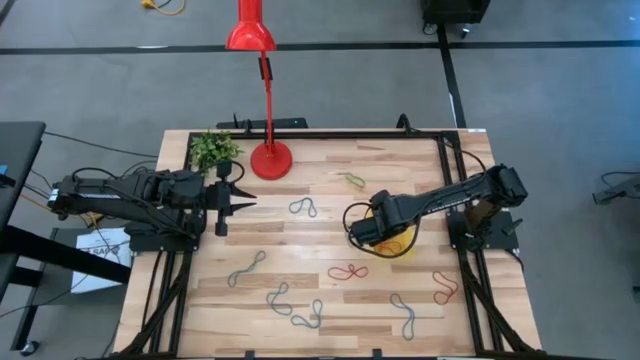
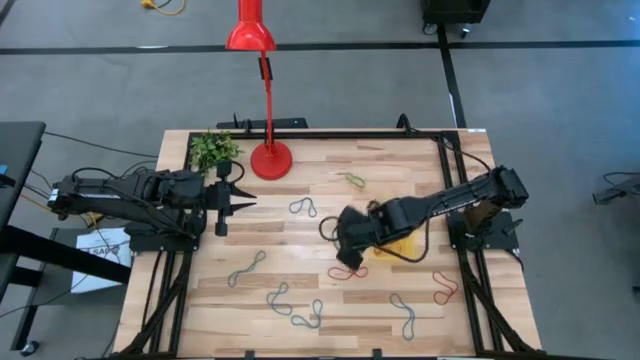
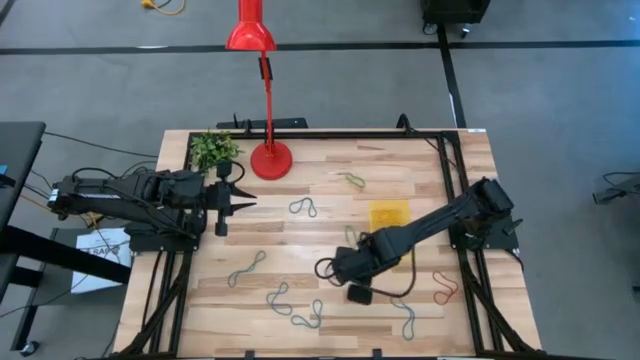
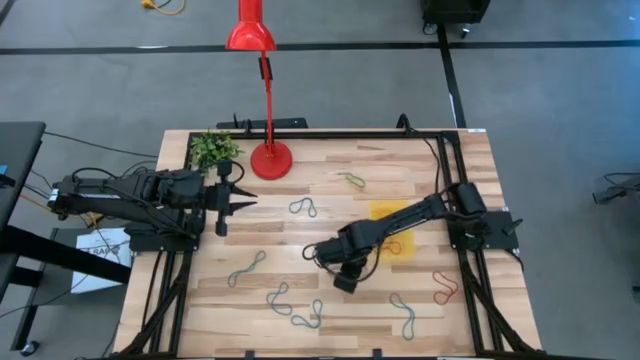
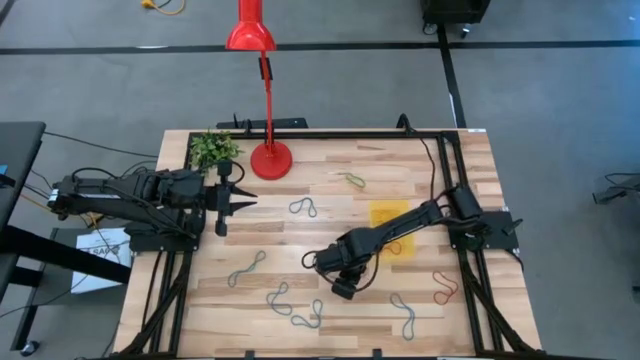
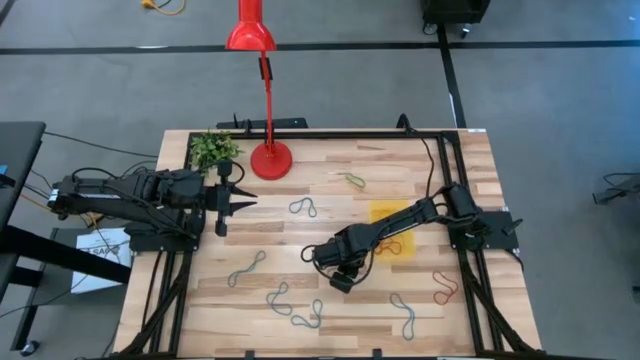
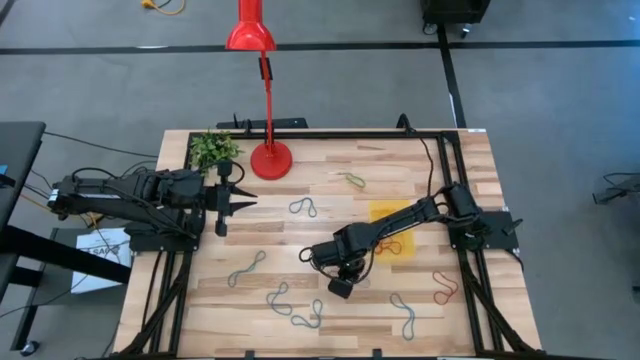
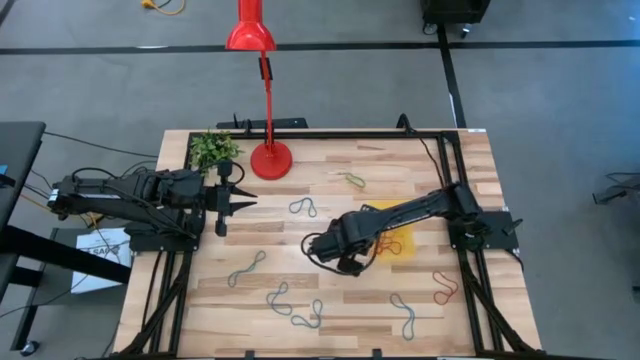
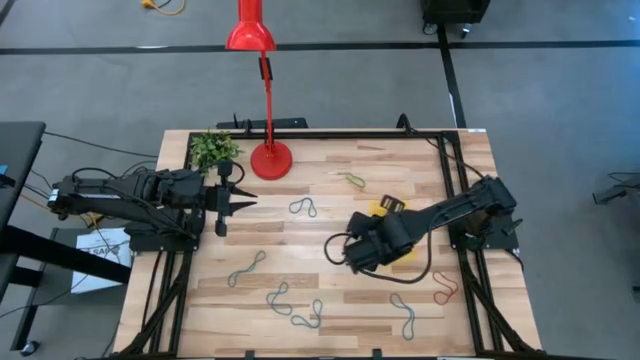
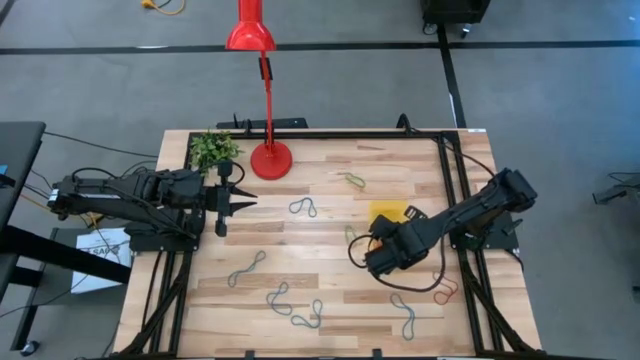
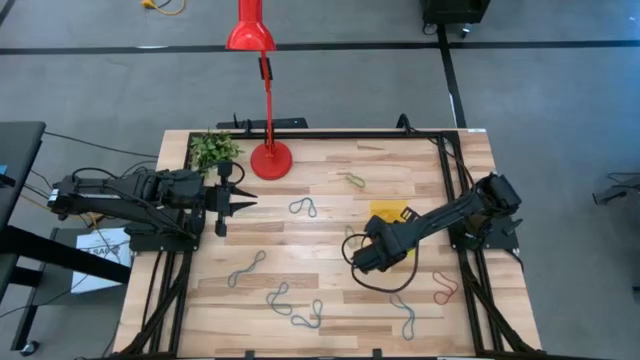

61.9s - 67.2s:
Task: Pick and place items into bin
Put the red rubber band into the yellow bin

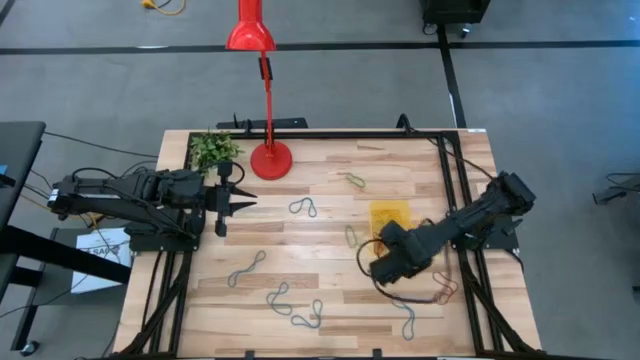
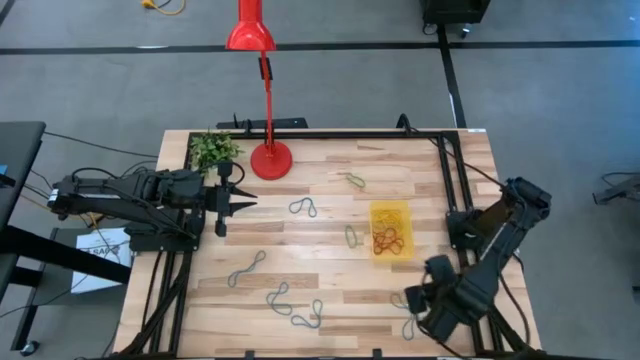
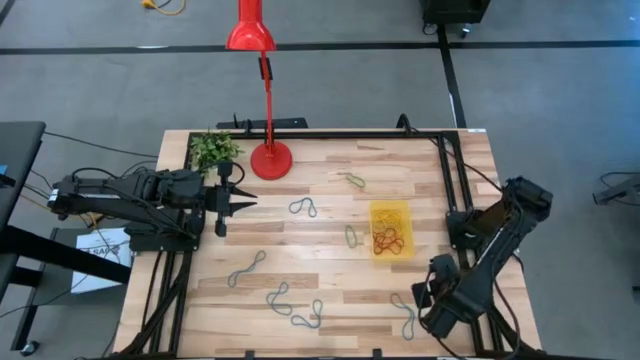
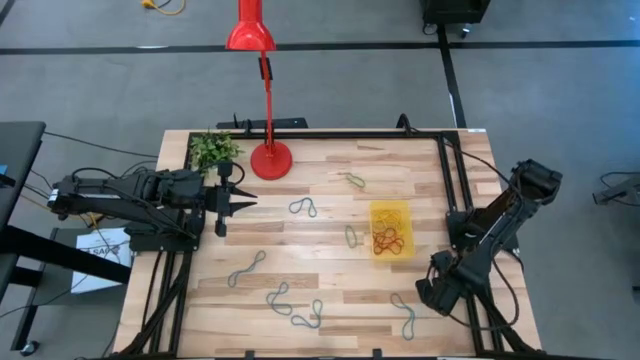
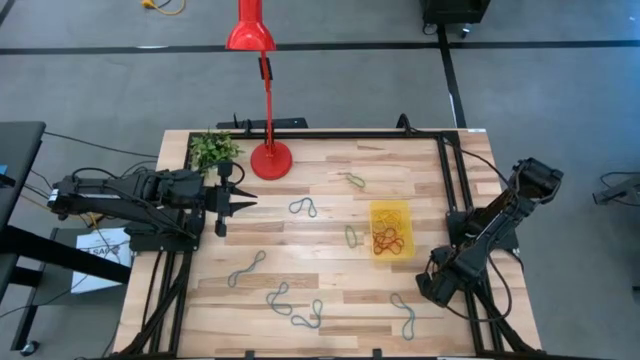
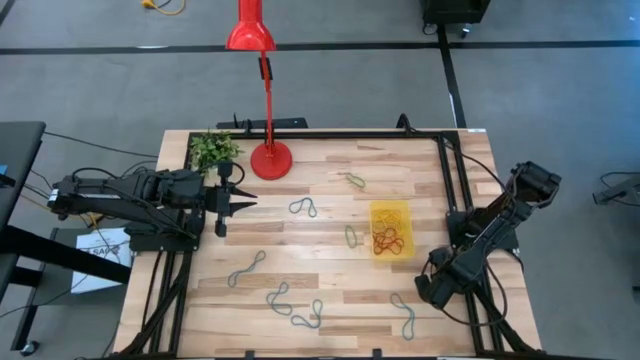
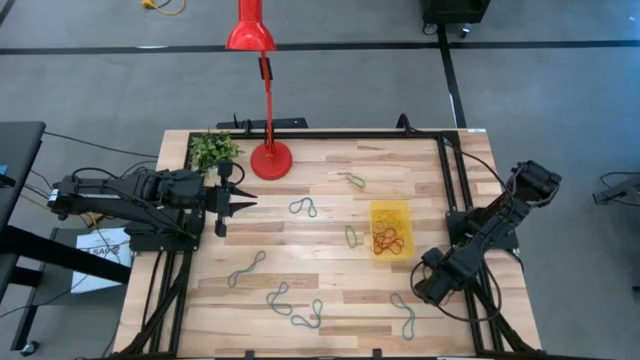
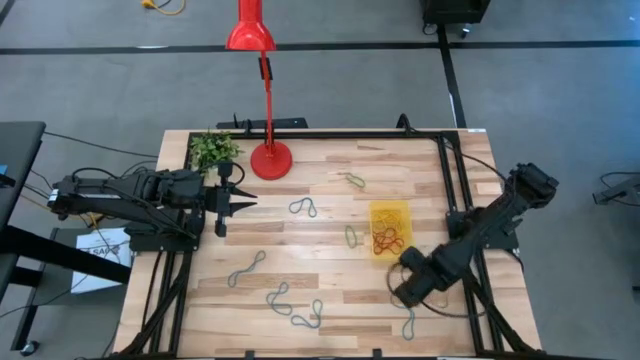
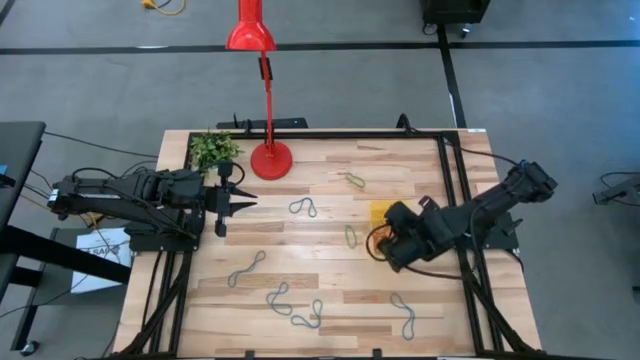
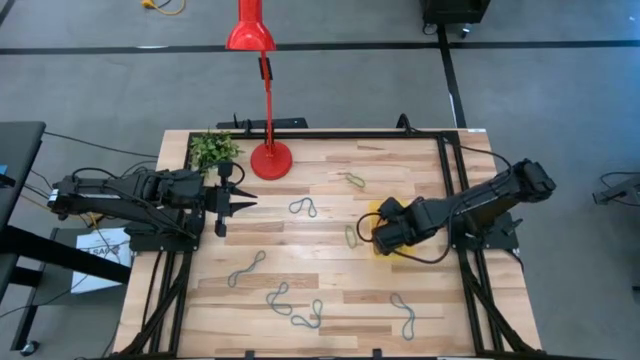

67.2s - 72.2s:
Put the red rubber band into the yellow bin

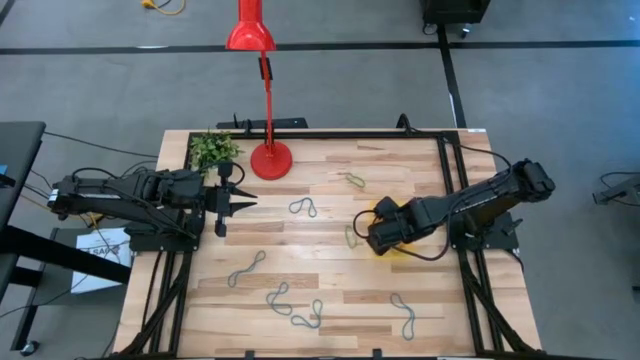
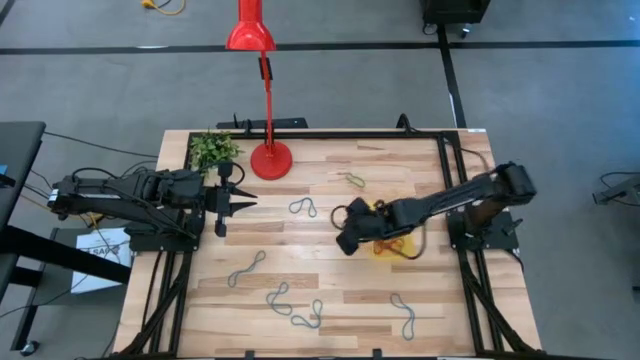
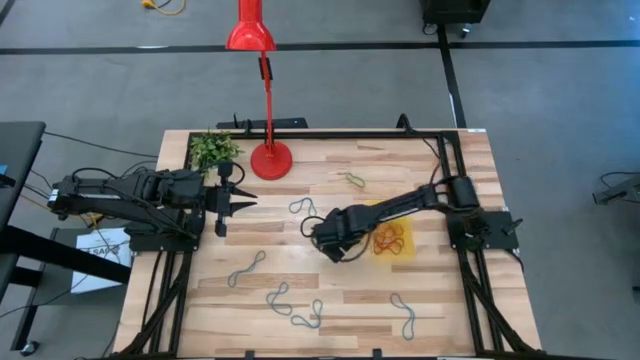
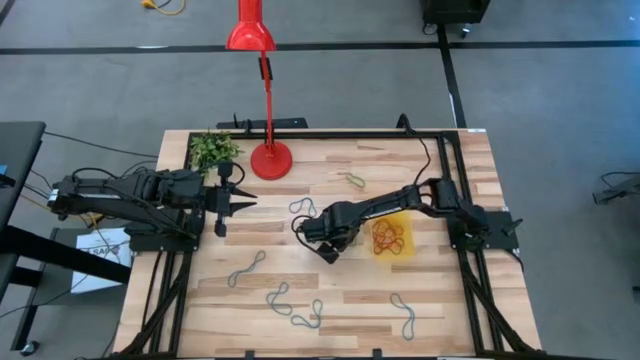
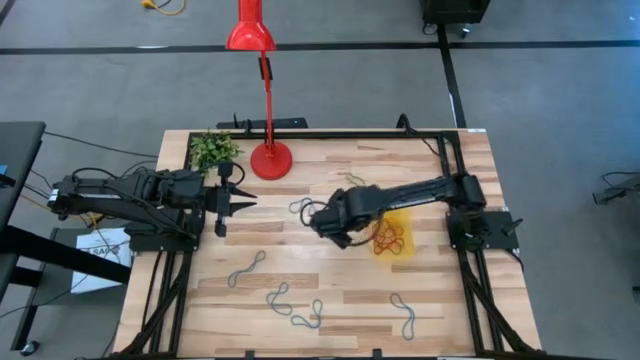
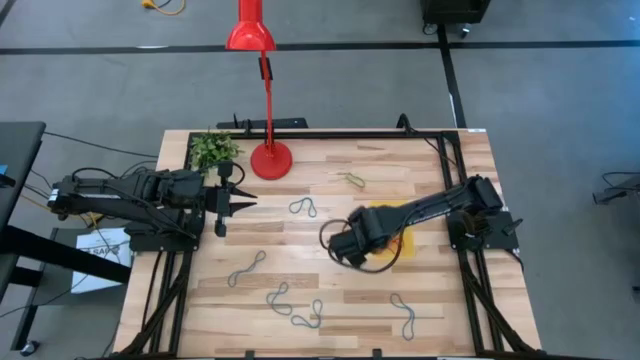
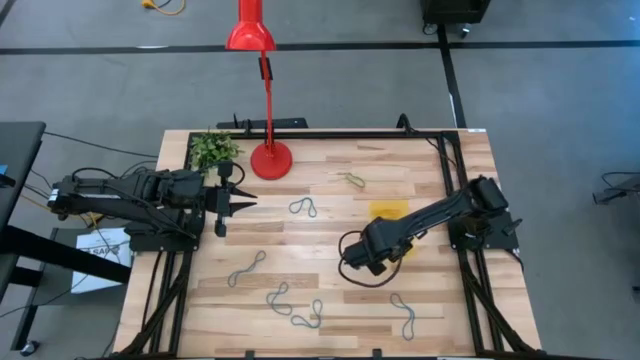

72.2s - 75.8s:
Put the green rubber band into the yellow bin

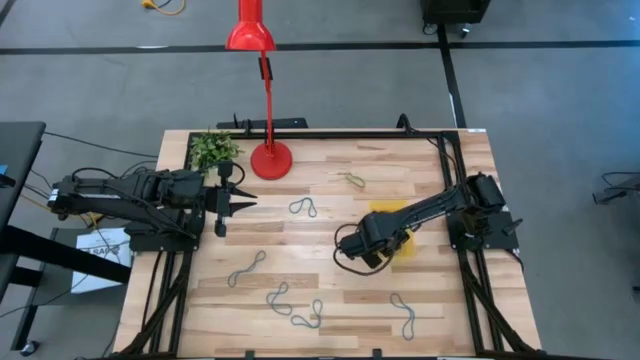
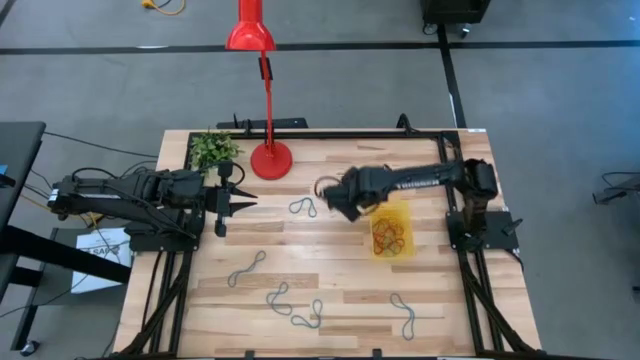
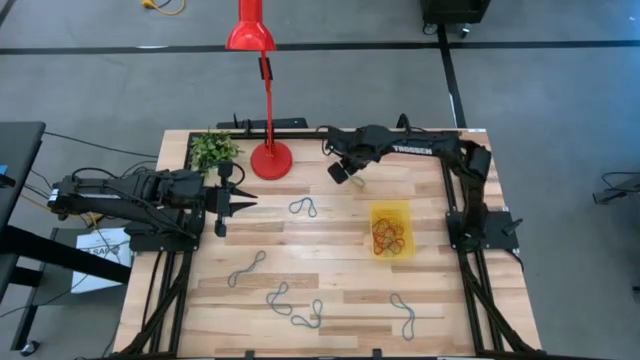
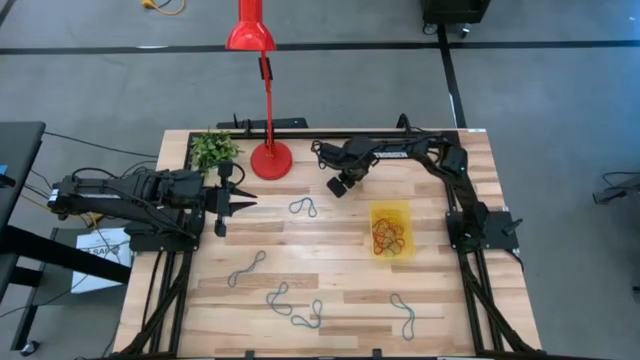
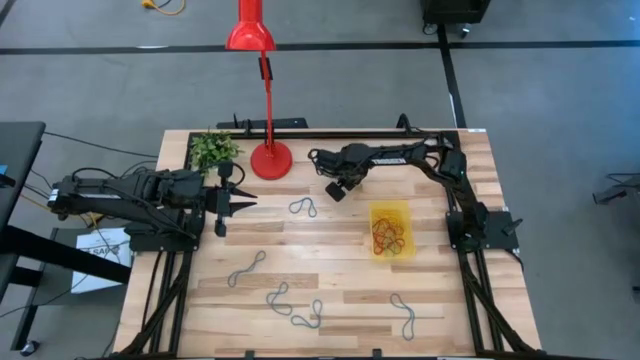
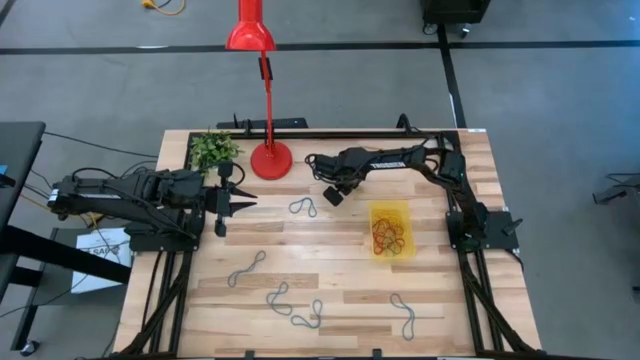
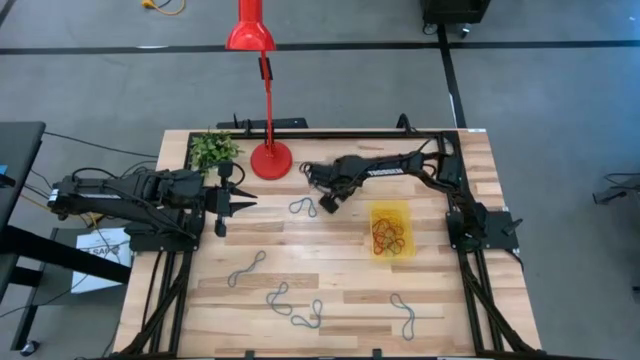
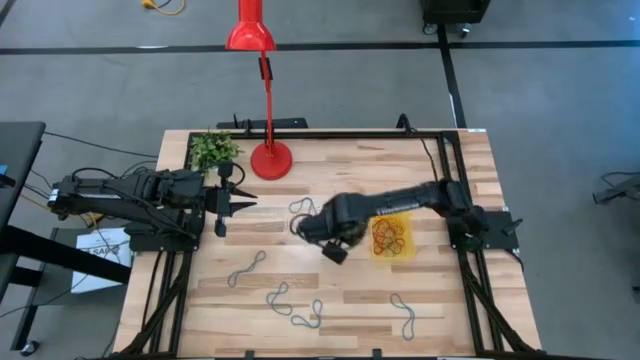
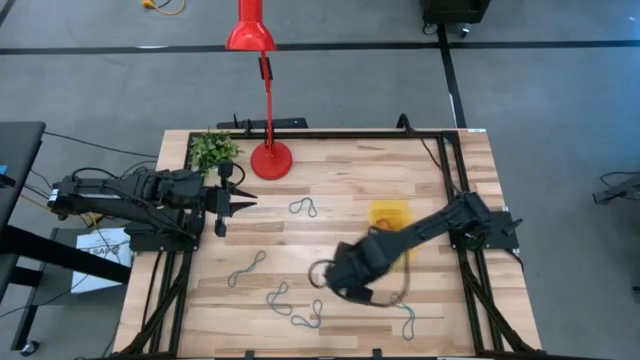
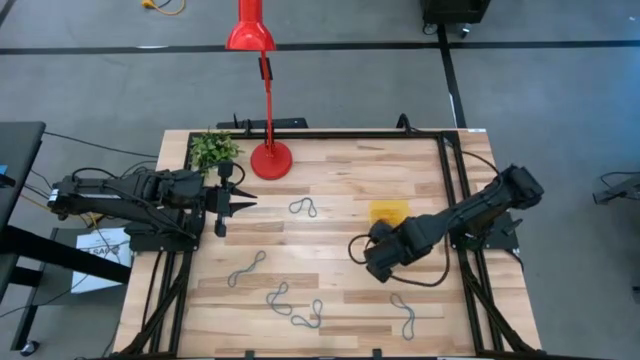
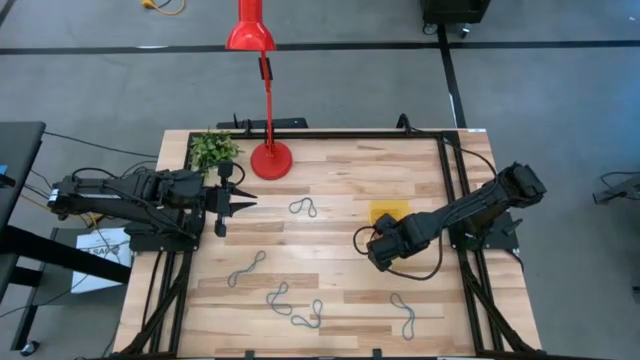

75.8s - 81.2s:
Put the green rubber band into the yellow bin

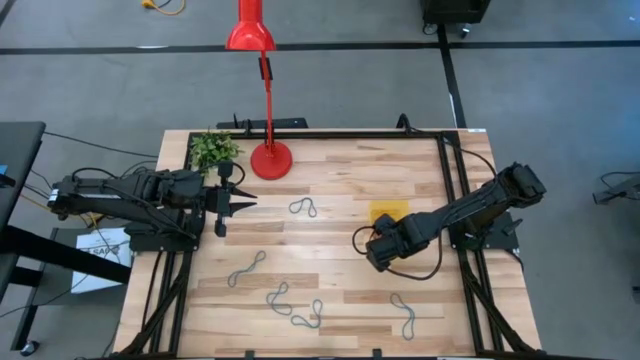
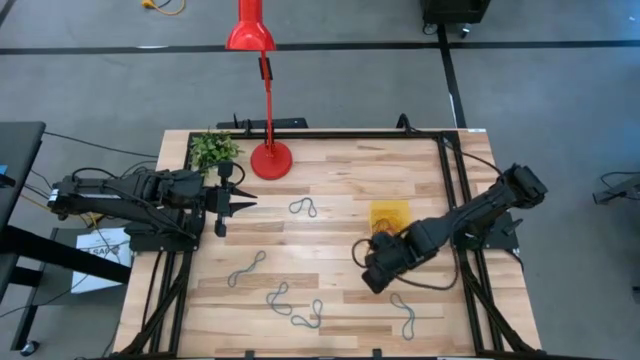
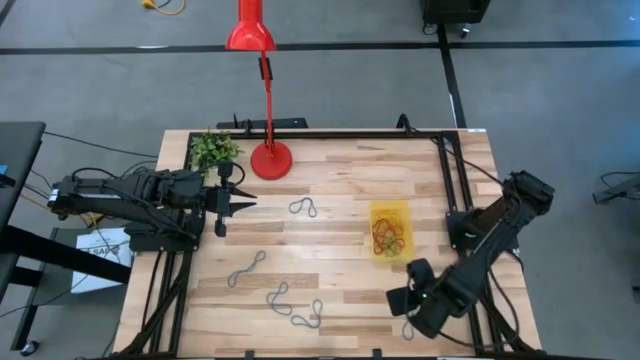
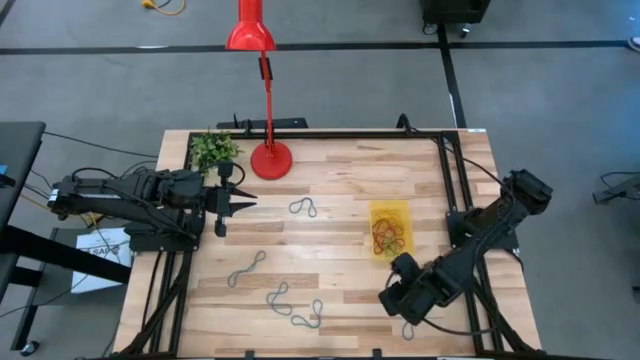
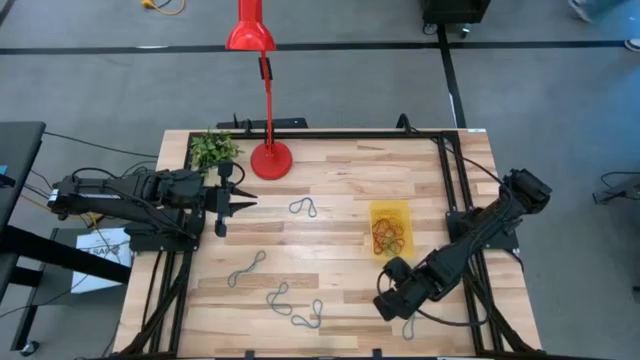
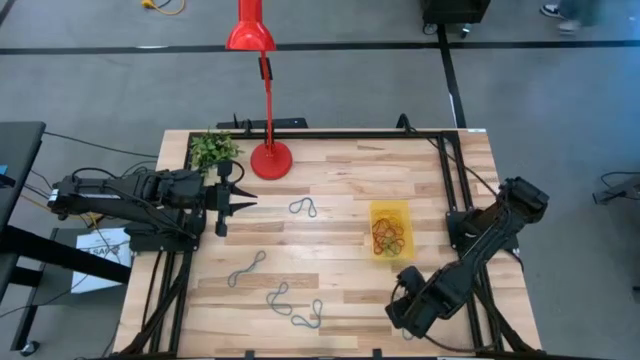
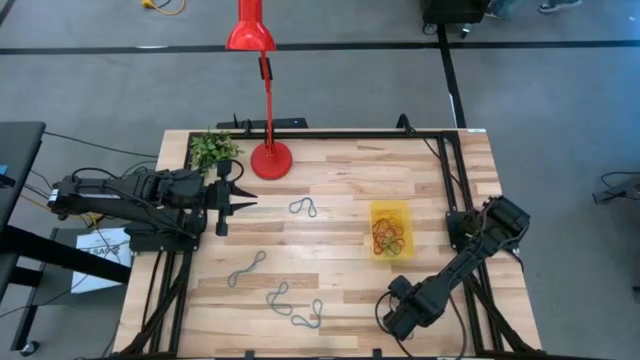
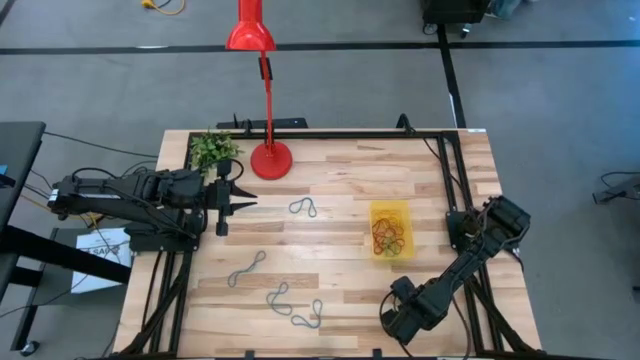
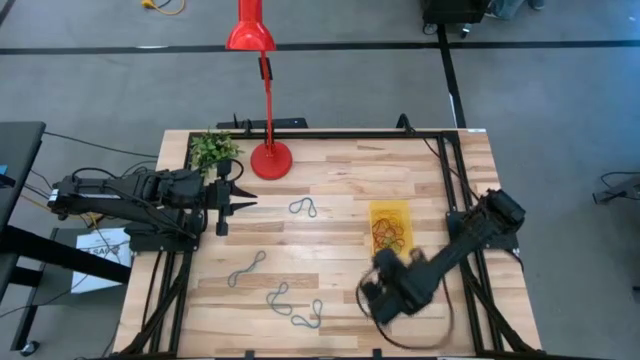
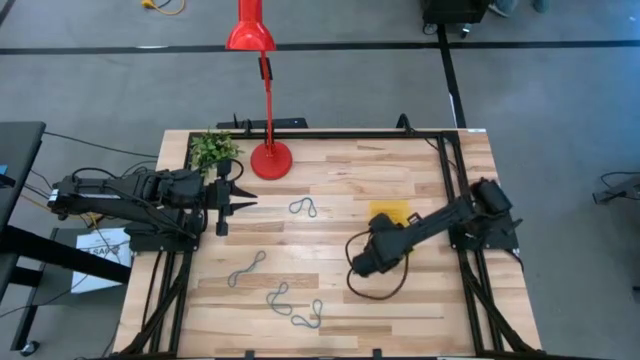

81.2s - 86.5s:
Put the blue rubber band into the yellow bin
